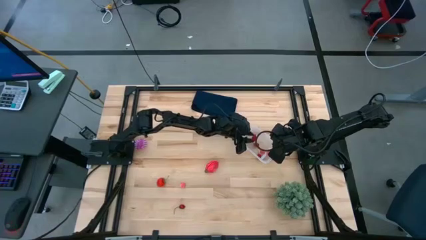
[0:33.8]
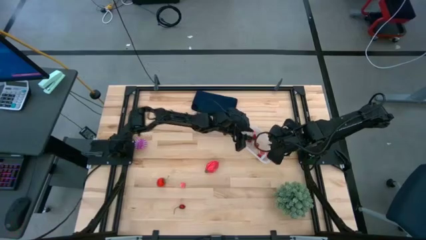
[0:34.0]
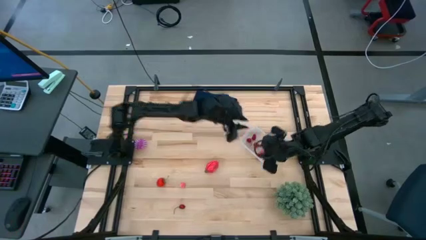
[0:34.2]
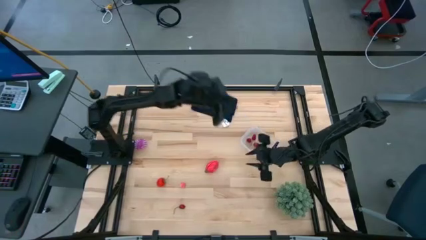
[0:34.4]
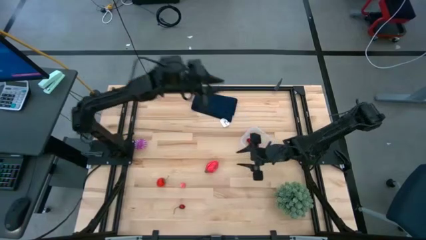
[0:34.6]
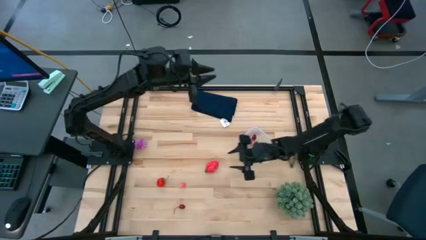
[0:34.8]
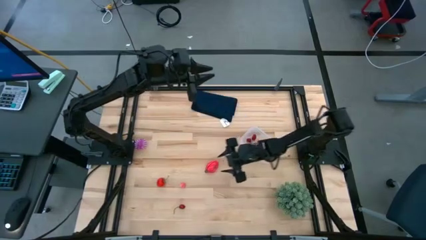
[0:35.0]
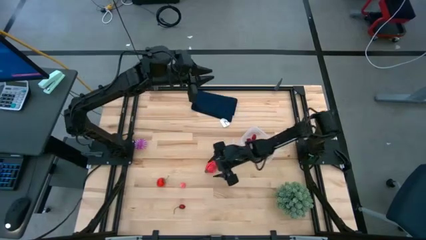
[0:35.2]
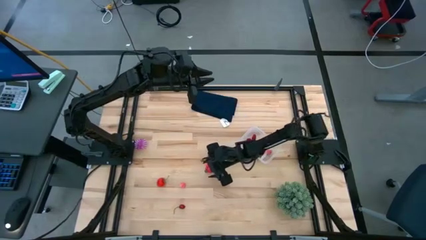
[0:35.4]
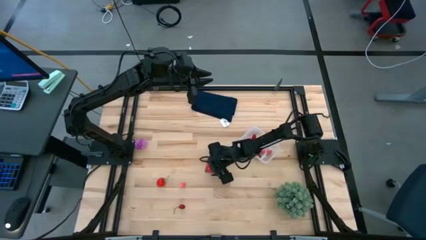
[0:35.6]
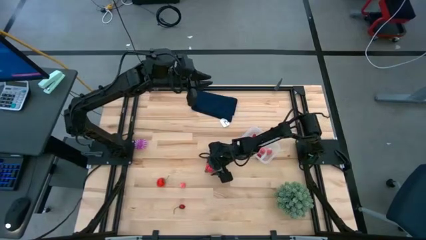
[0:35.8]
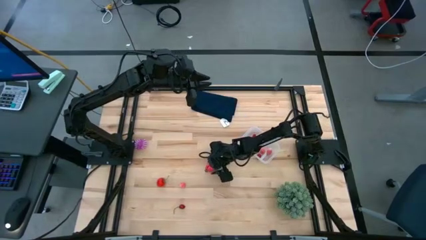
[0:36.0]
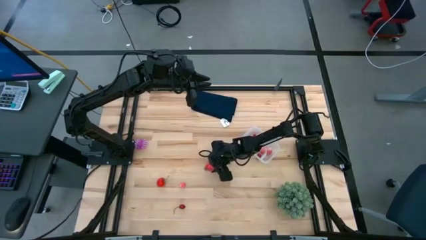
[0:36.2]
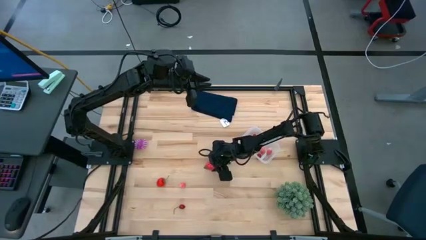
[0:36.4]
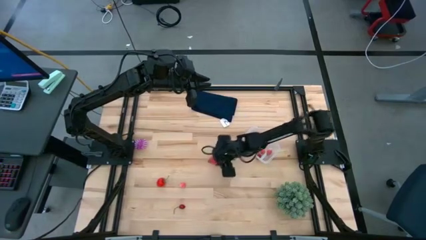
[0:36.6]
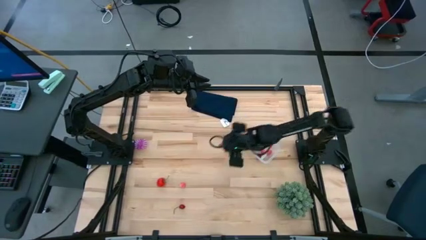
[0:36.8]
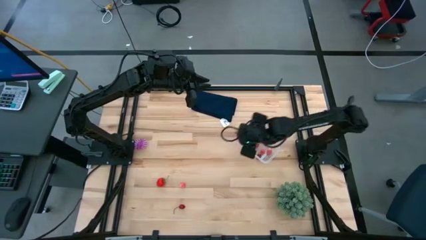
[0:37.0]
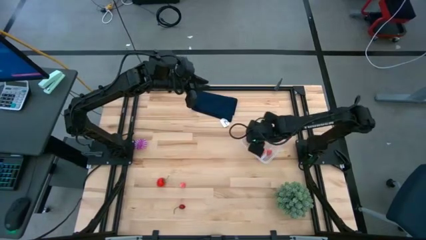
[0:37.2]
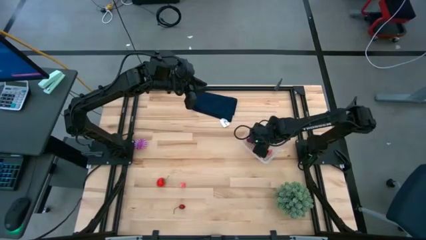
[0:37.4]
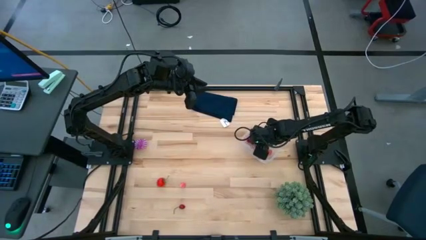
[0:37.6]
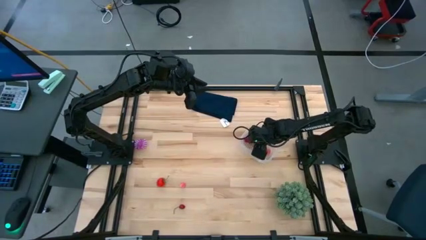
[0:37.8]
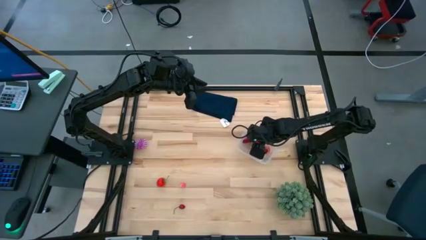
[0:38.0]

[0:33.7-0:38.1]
Task: Pick and placing Produce into tupperware
Put the dragon fruit into the transparent bin

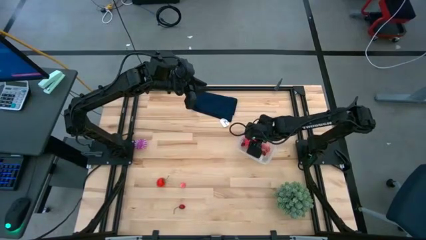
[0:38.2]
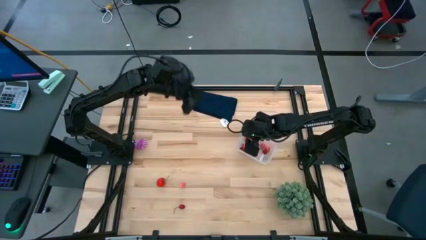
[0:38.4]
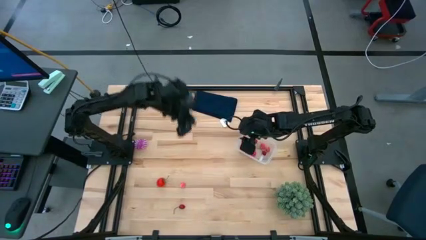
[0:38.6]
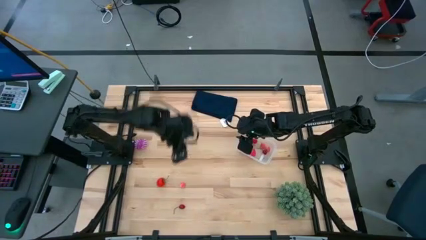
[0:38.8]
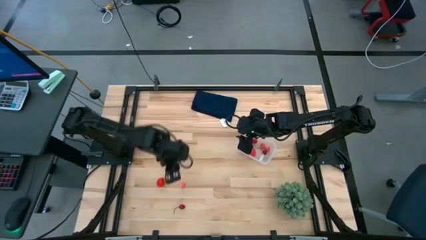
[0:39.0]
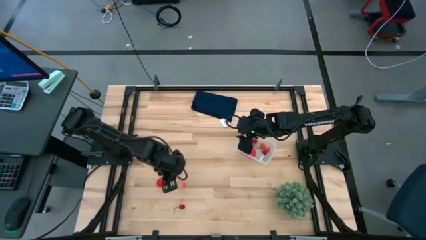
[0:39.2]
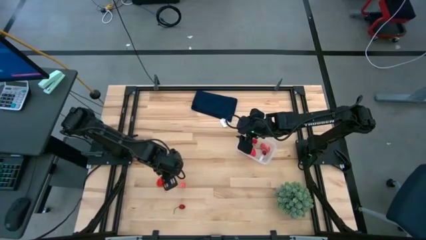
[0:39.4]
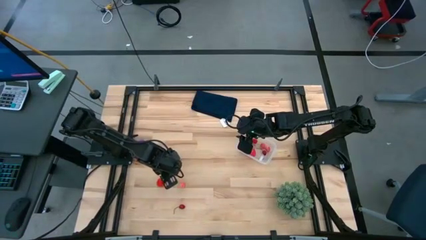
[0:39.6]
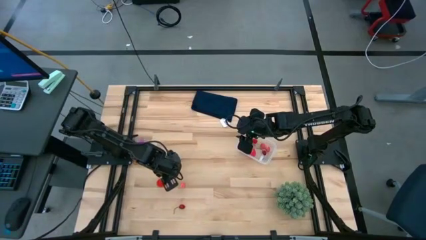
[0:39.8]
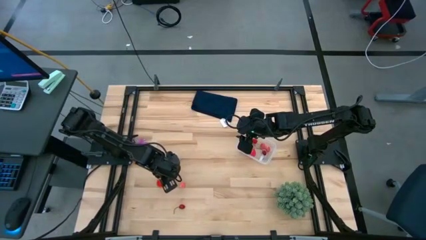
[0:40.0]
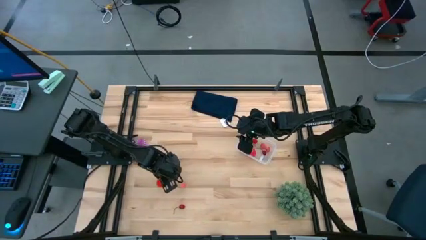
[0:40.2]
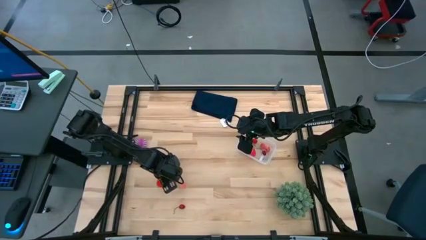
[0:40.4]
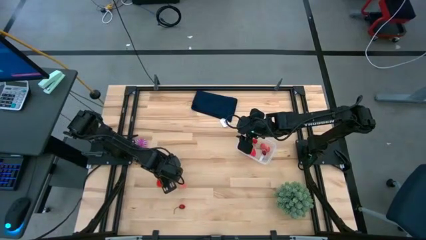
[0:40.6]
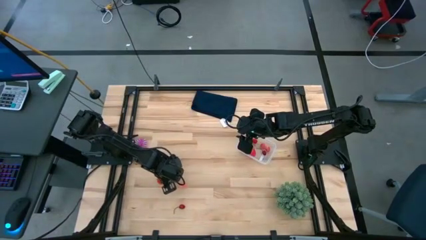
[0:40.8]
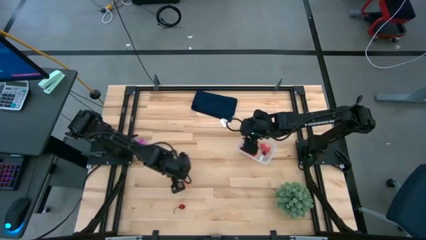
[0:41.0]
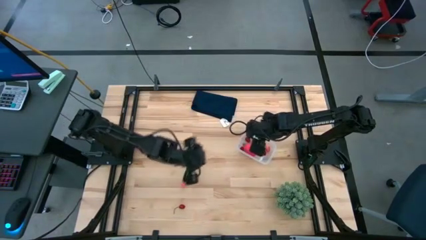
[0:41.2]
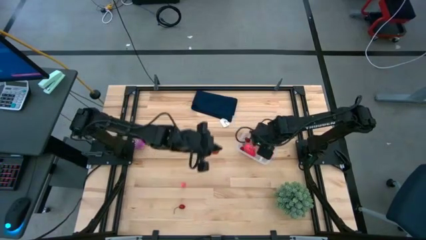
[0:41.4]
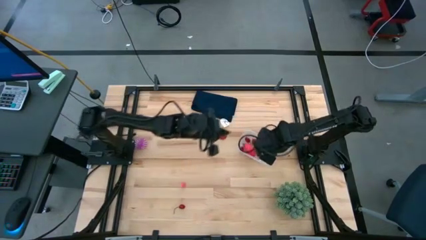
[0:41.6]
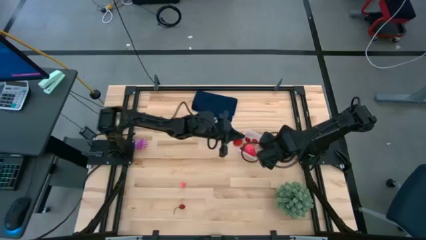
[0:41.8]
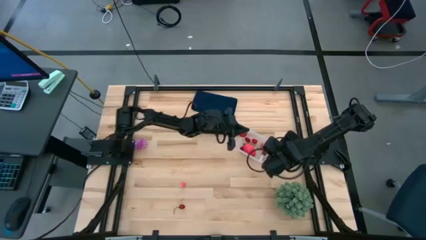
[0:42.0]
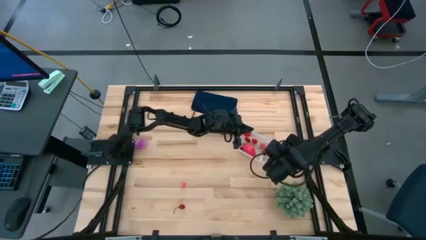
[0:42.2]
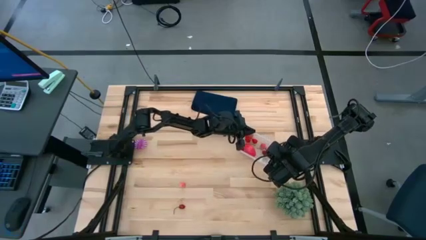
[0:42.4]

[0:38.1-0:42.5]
Put the strawberry into the transparent bin

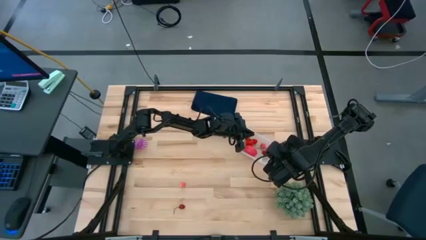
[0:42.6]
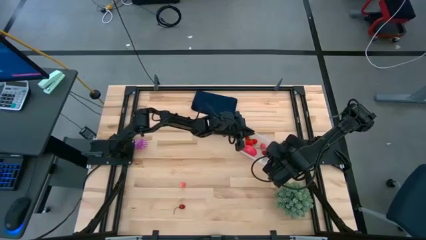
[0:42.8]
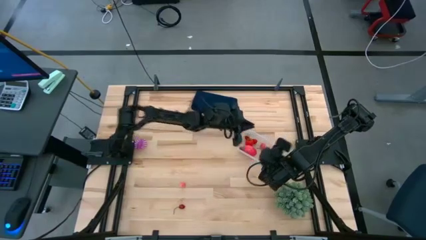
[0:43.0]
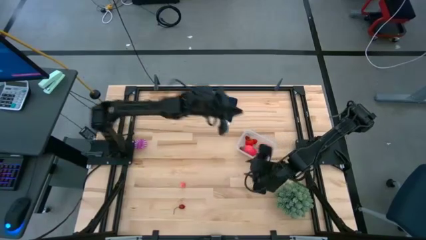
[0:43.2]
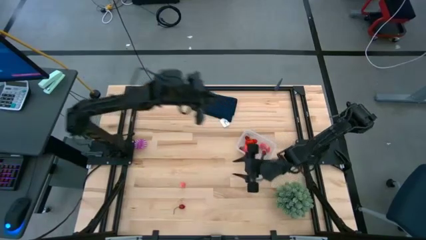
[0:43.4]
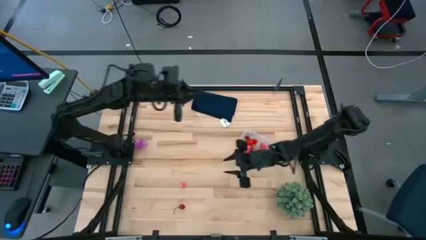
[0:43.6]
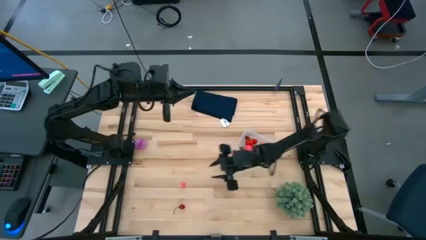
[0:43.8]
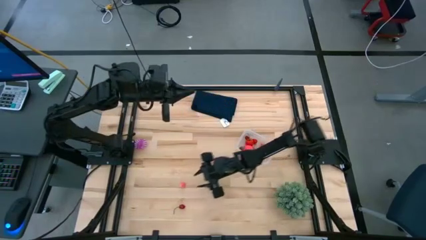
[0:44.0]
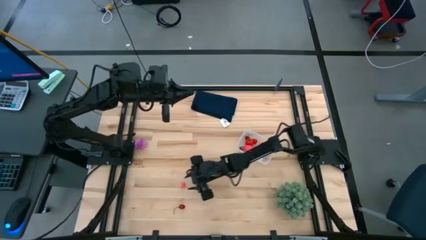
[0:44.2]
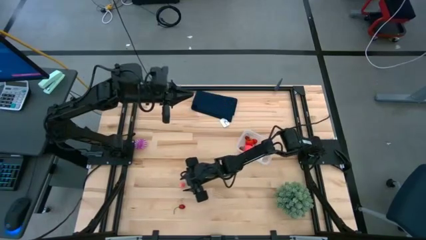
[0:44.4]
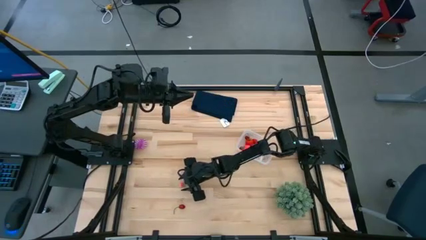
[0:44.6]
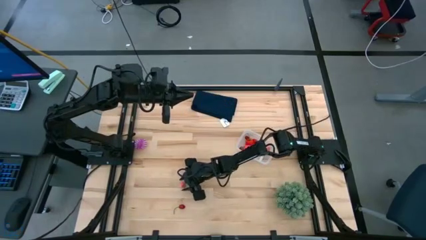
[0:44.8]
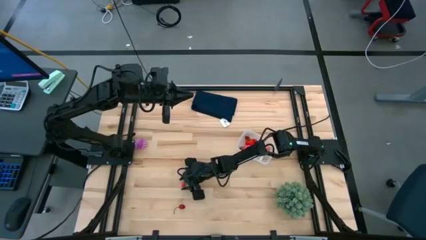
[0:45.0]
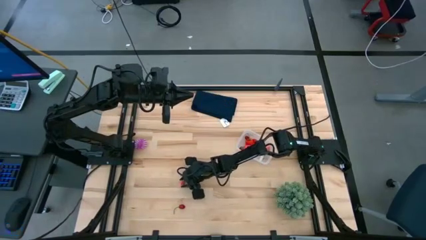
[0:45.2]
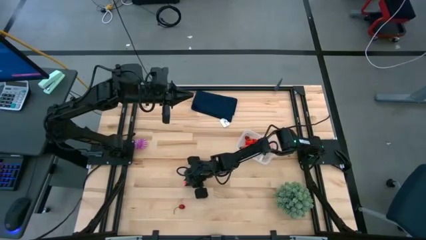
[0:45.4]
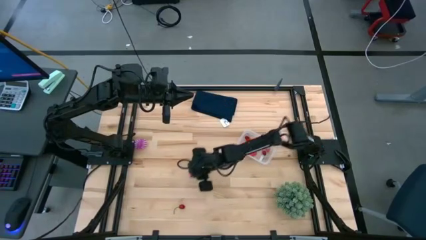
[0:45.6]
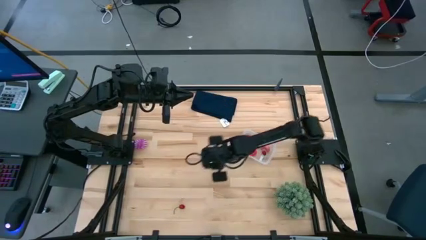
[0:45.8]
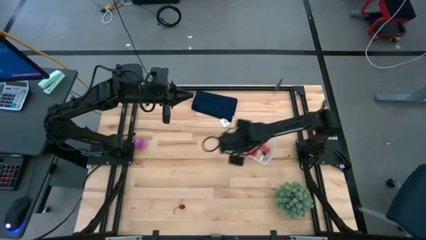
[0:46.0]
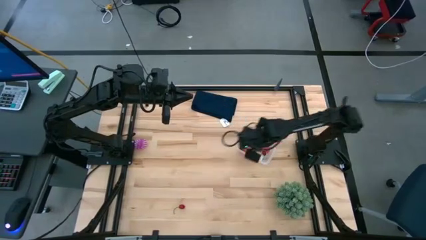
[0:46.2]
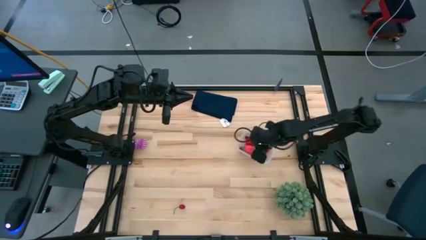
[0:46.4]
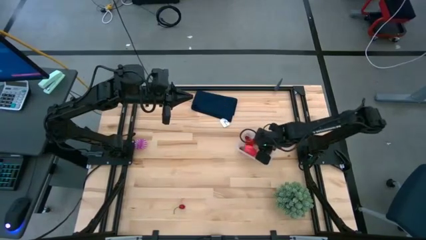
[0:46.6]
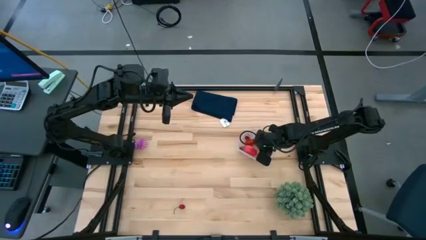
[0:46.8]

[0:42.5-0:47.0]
Put the peach into the transparent bin

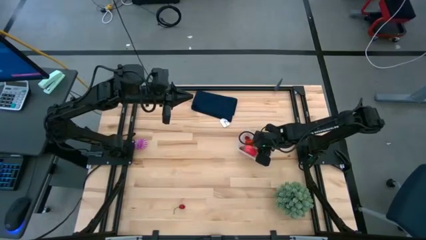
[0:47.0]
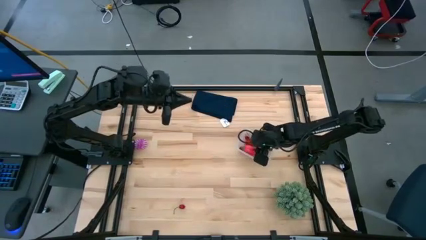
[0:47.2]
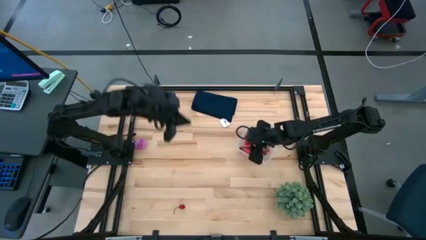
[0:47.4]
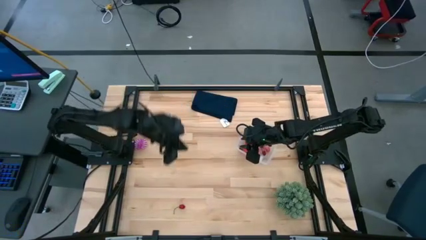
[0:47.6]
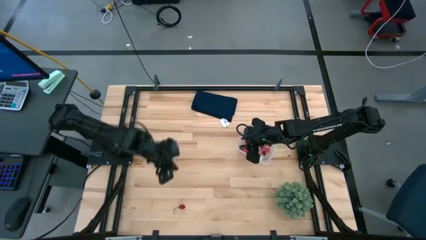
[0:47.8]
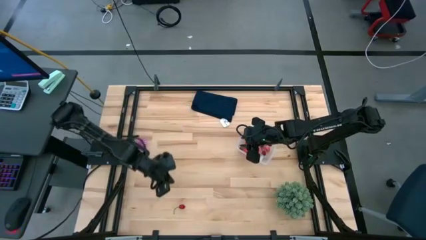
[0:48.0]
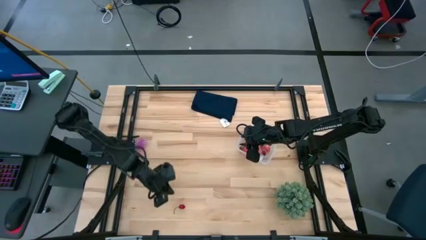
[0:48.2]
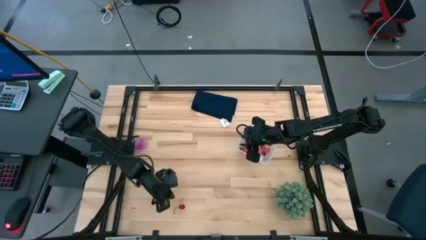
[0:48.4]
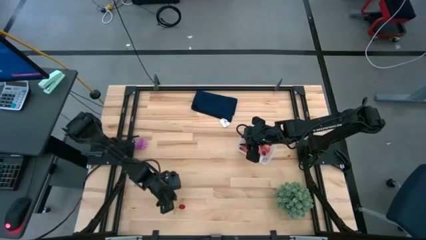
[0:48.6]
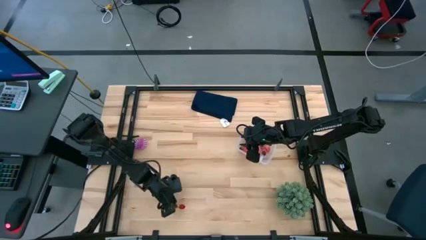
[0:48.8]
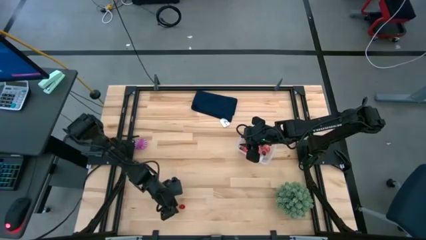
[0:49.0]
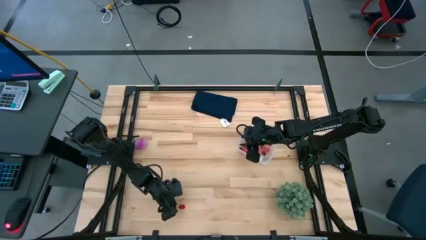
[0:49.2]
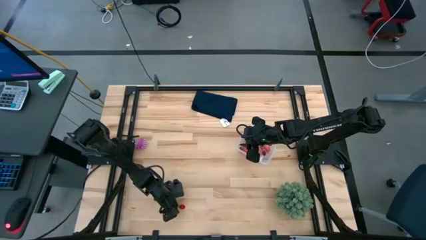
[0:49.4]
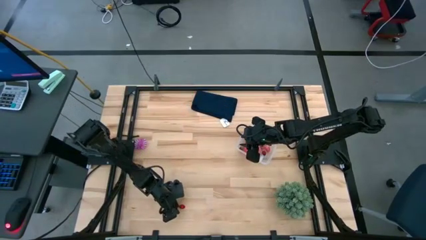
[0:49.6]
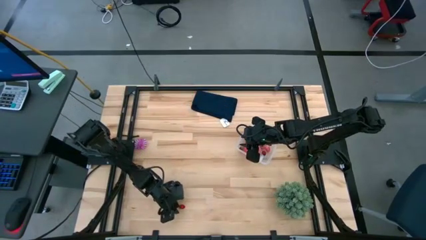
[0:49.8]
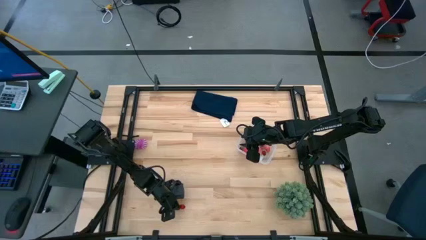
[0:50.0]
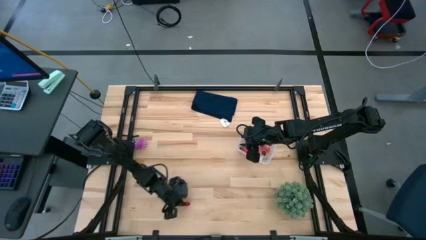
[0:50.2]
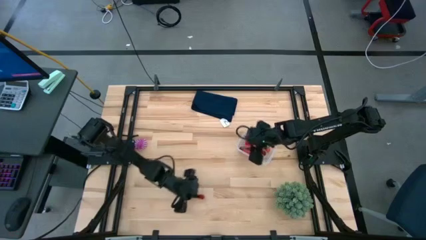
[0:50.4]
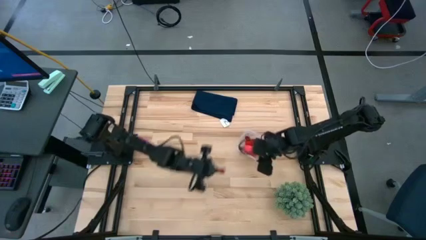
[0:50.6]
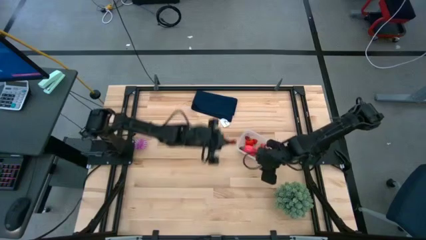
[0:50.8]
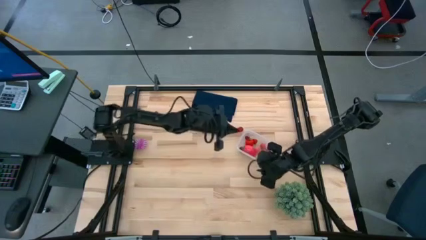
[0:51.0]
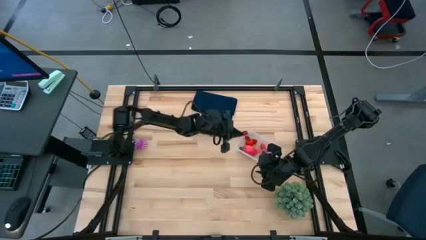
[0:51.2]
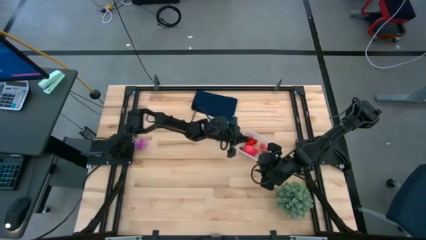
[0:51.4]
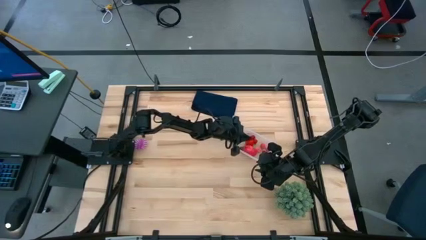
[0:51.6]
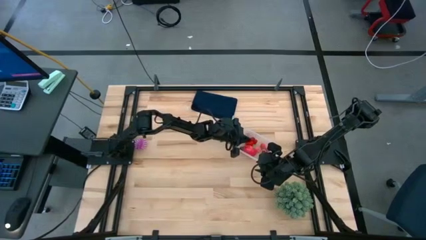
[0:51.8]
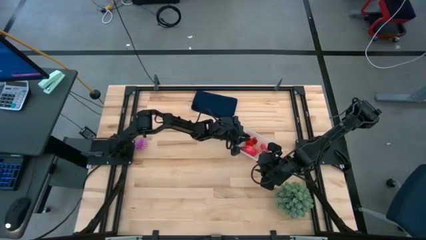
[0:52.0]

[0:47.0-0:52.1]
Put the cherry into the transparent bin
